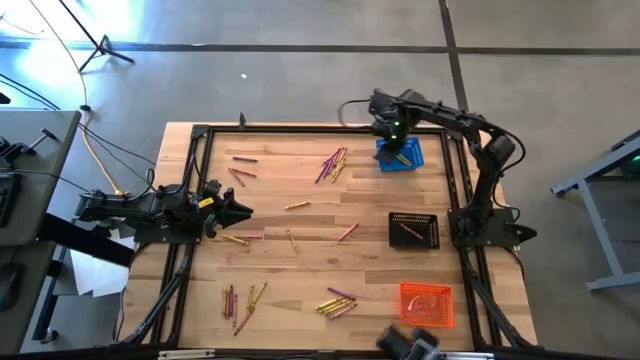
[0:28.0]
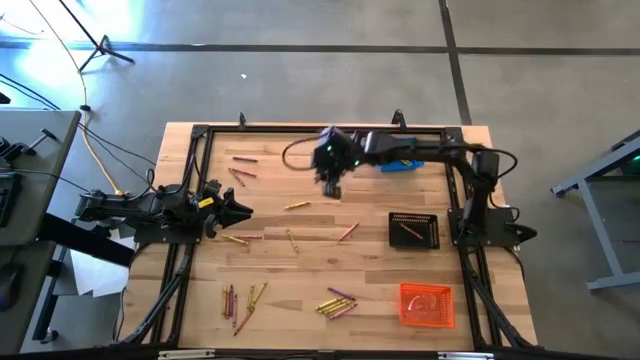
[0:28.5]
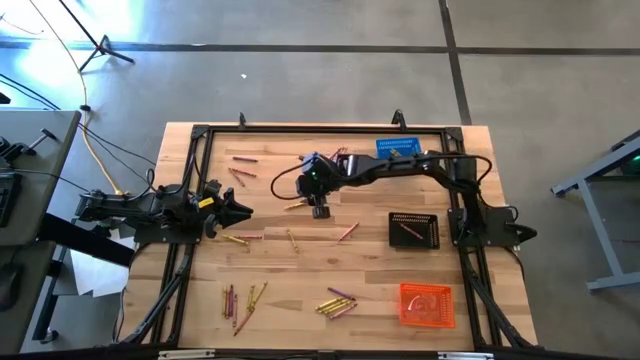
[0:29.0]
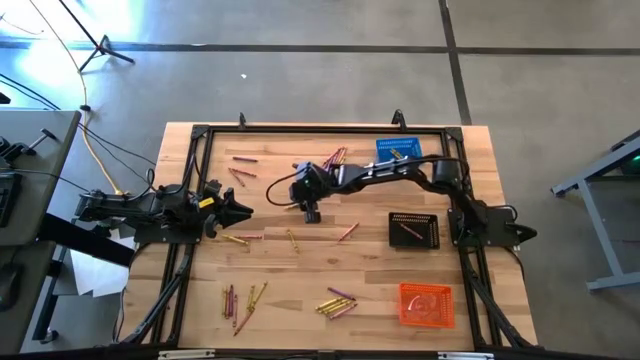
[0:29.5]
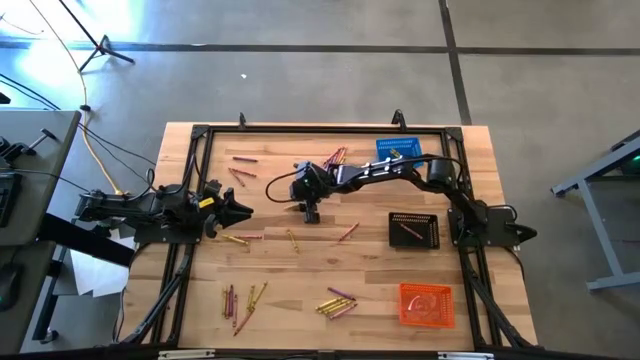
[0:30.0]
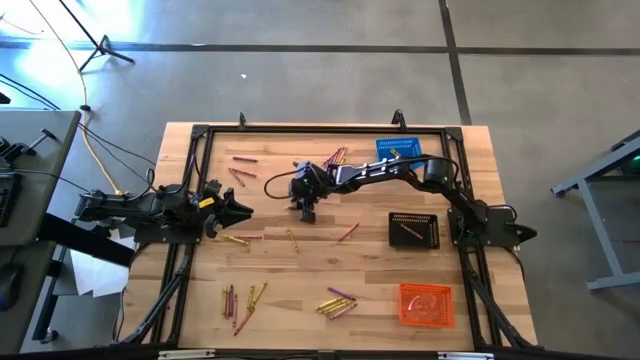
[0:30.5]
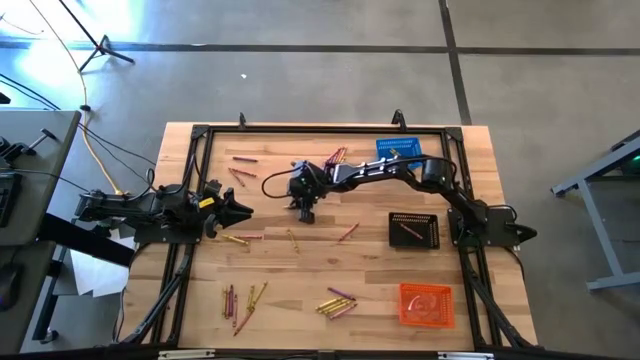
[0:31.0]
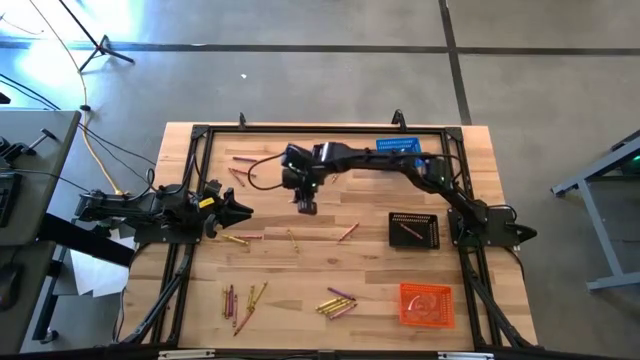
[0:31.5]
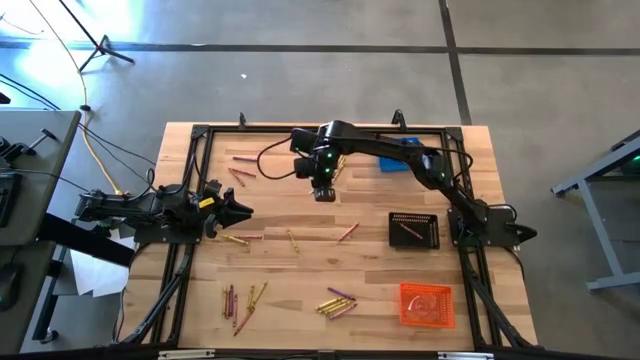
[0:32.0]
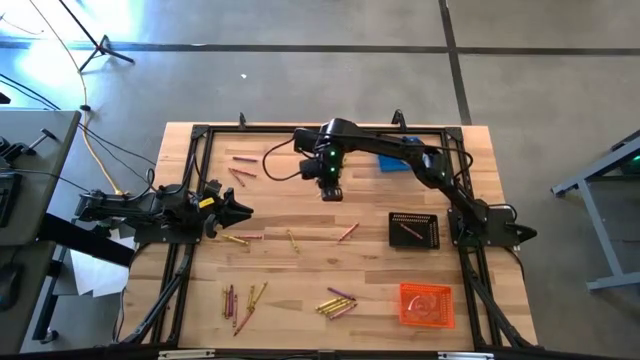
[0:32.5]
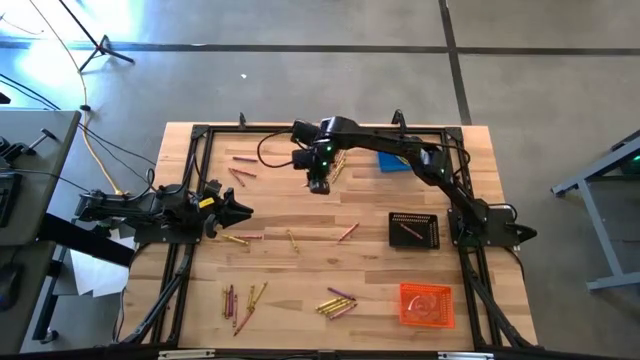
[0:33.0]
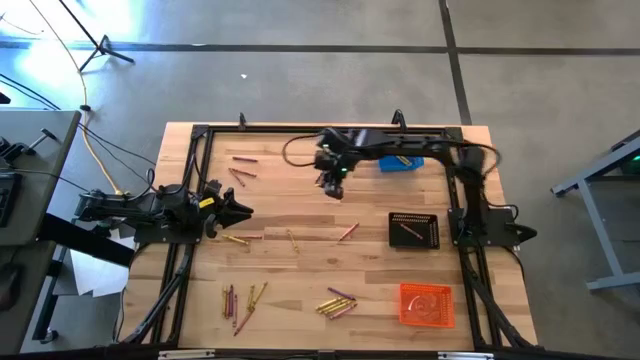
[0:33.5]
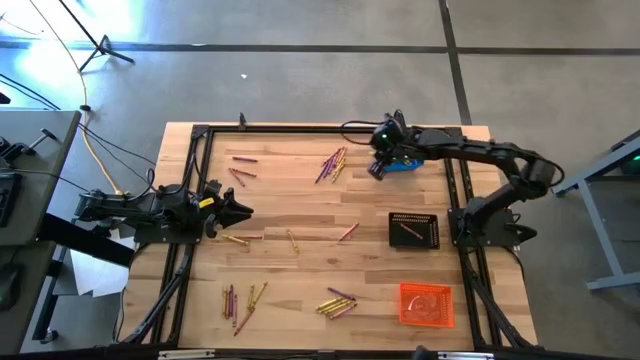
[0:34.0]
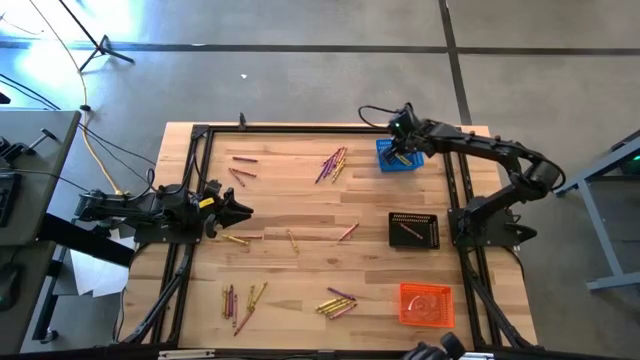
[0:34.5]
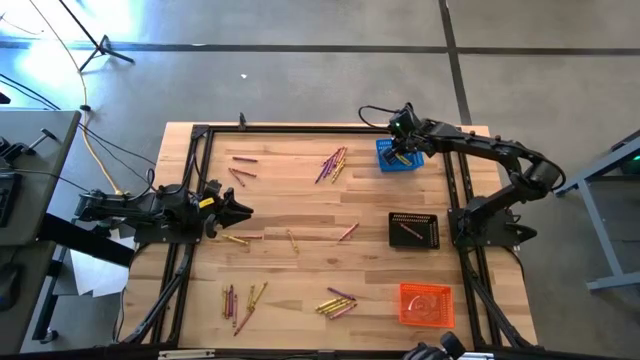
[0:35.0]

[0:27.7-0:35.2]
Task: Sort crayons
Put the yellow crayon into the blue bin

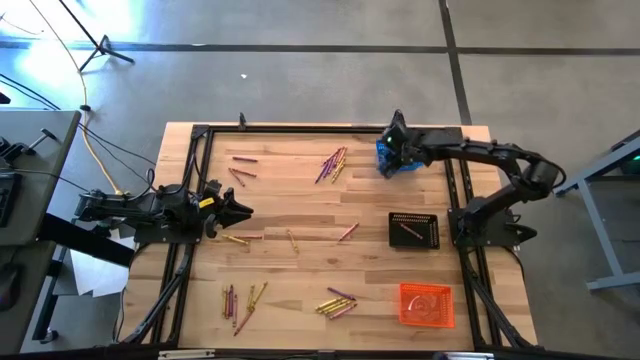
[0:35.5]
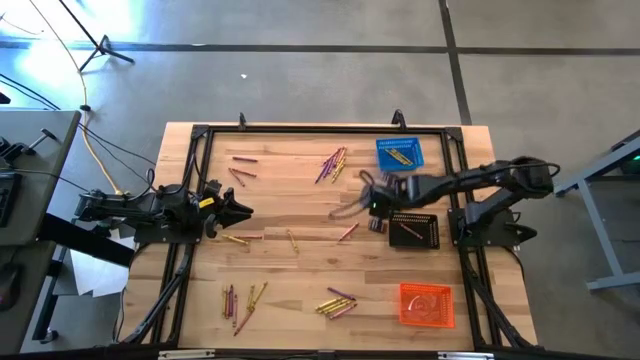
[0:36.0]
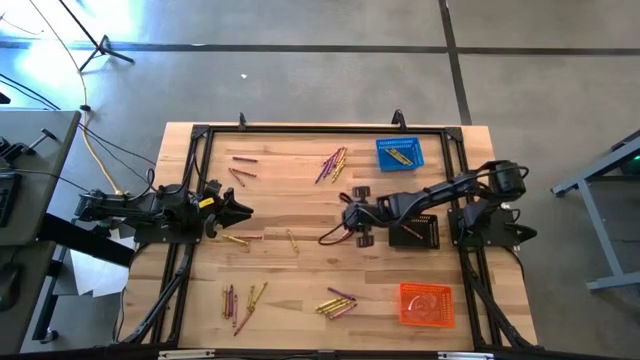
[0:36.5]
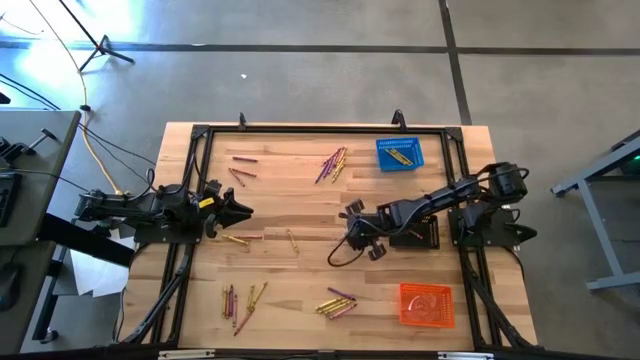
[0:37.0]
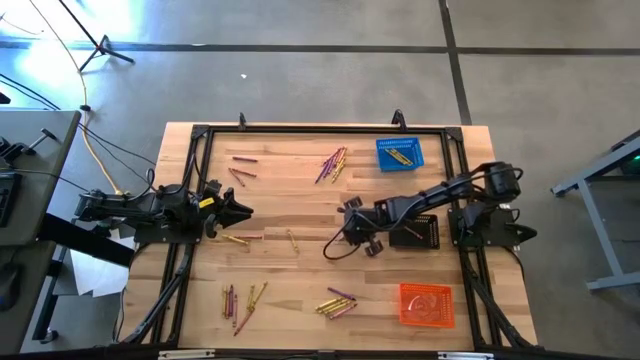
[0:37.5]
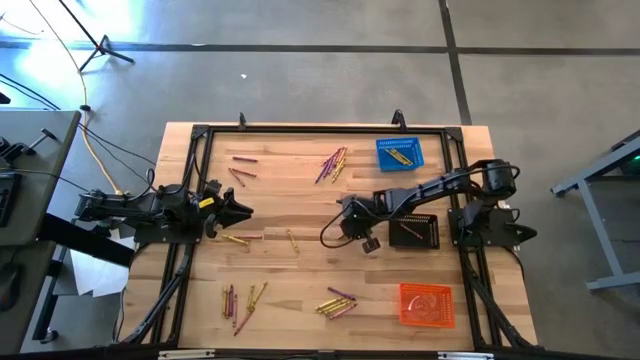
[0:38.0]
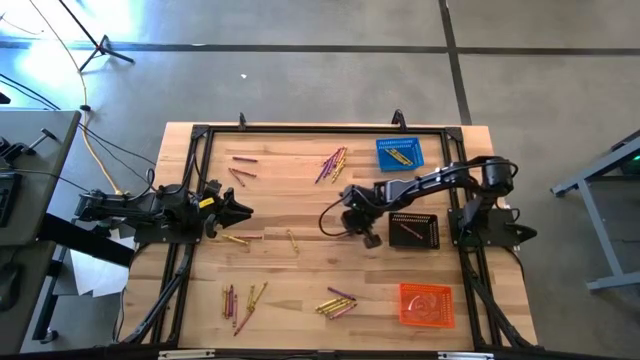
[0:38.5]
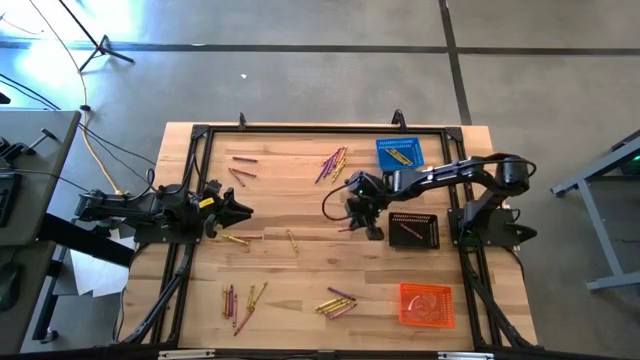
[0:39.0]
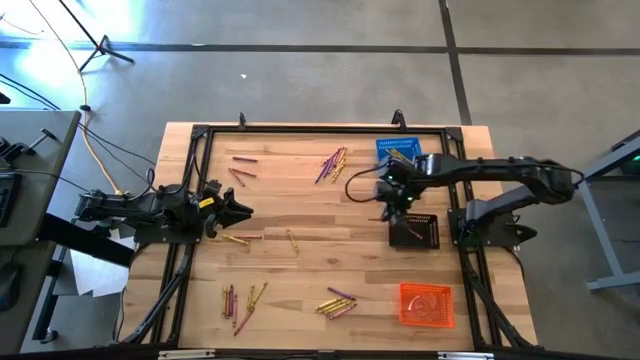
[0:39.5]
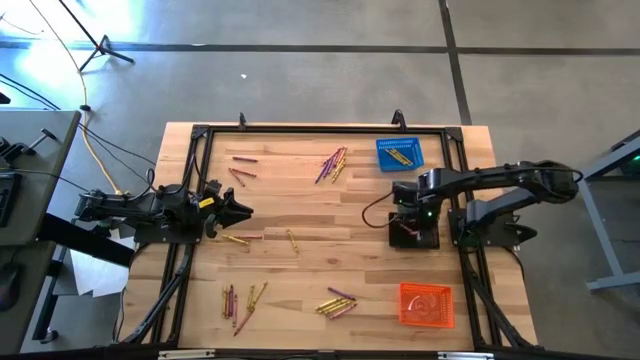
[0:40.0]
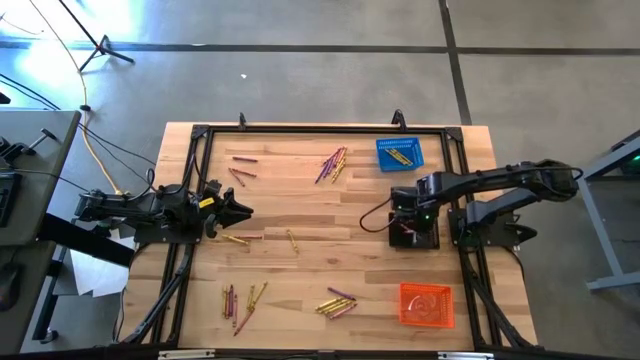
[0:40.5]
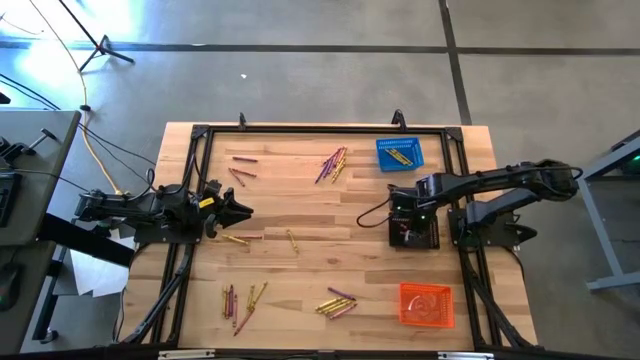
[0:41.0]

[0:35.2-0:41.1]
Put the red crayon into the black bin

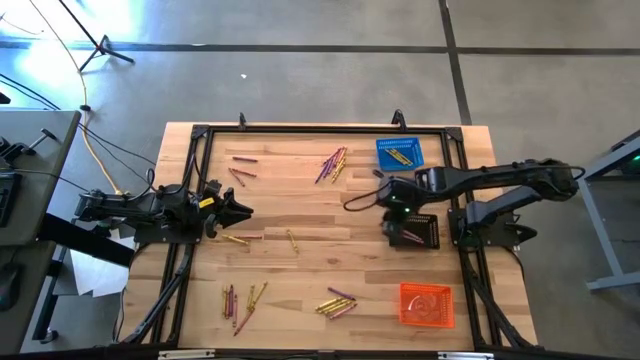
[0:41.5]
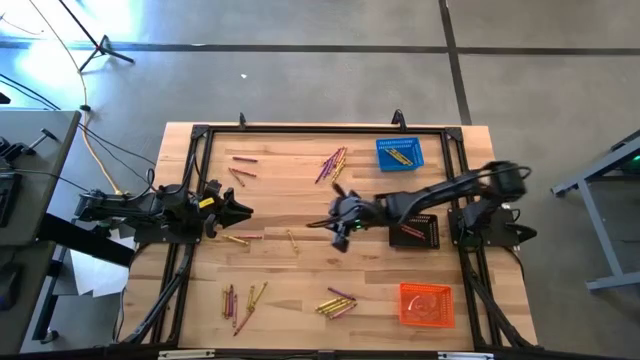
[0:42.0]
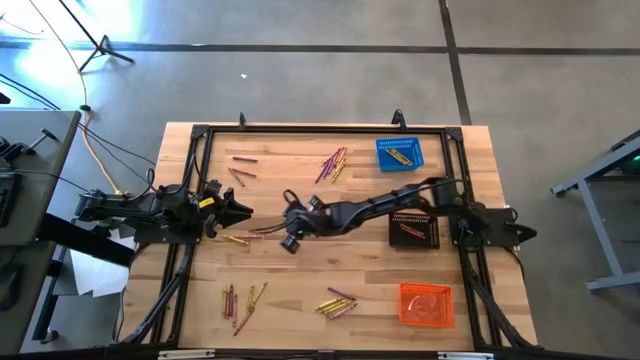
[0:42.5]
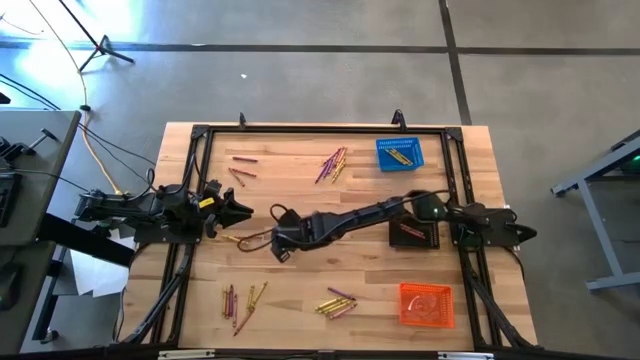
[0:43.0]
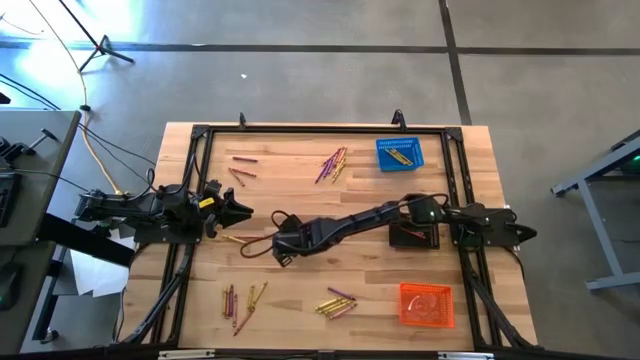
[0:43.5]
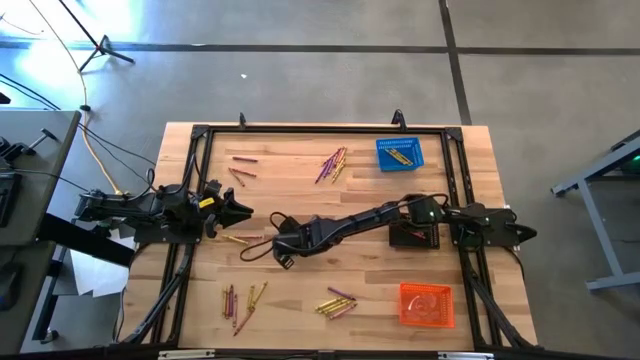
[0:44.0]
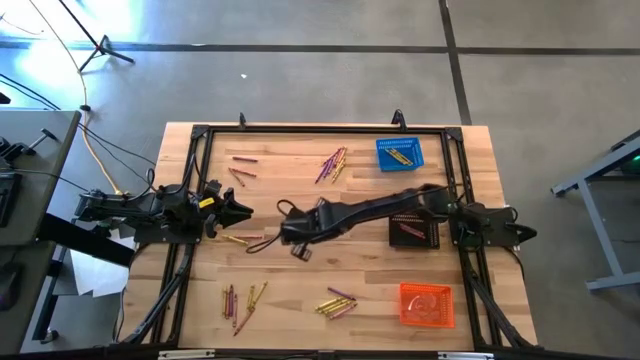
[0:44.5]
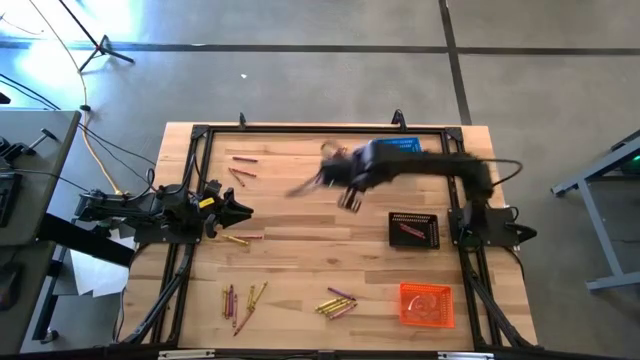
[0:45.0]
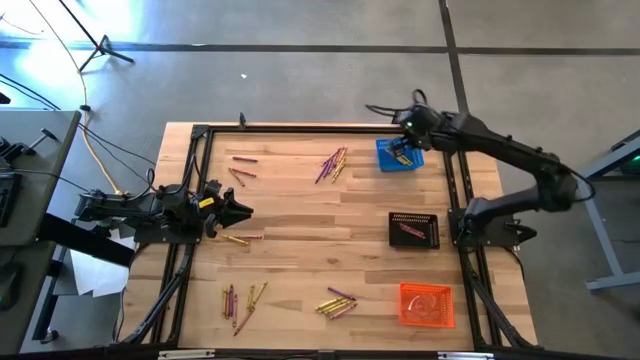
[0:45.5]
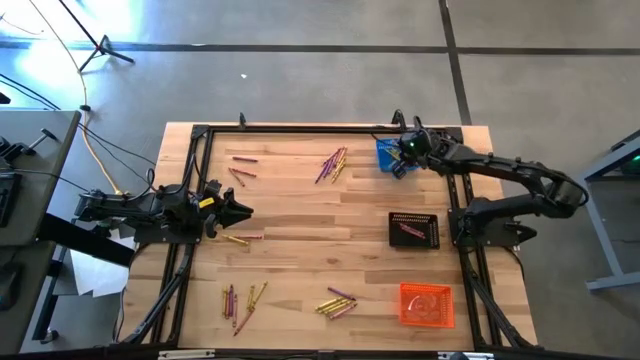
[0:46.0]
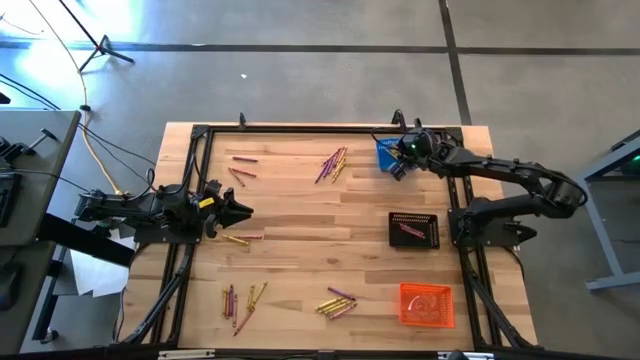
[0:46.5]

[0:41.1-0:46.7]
Put the yellow crayon into the blue bin

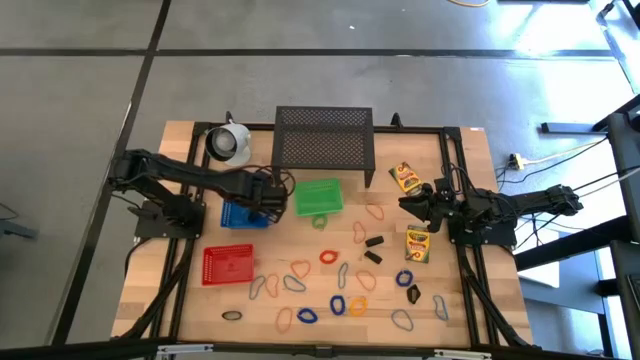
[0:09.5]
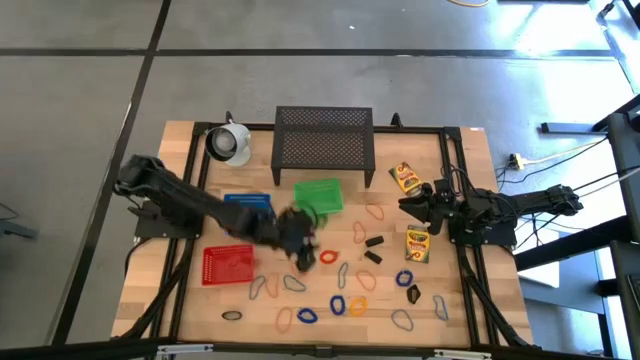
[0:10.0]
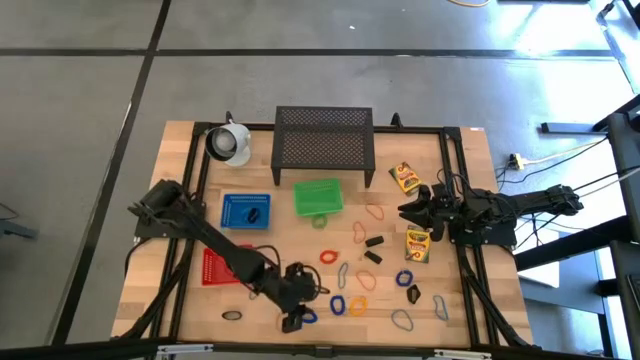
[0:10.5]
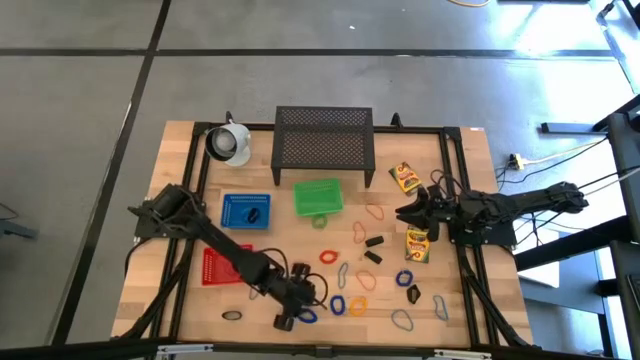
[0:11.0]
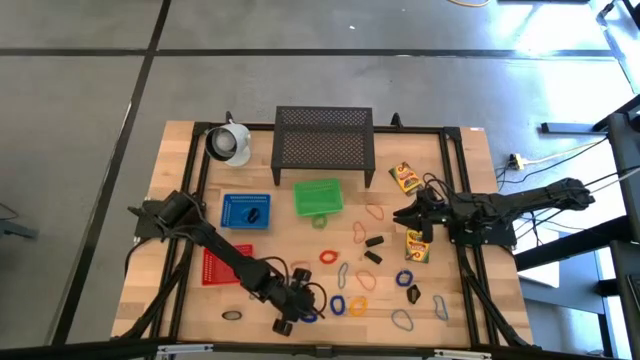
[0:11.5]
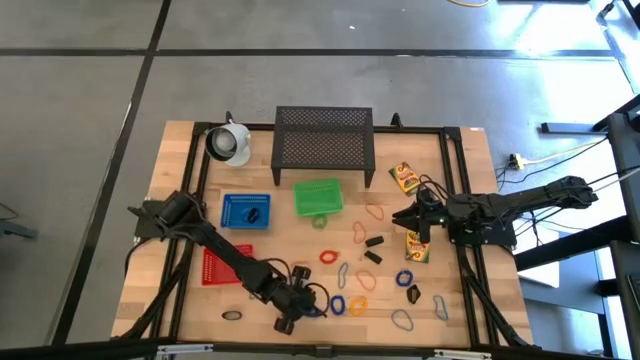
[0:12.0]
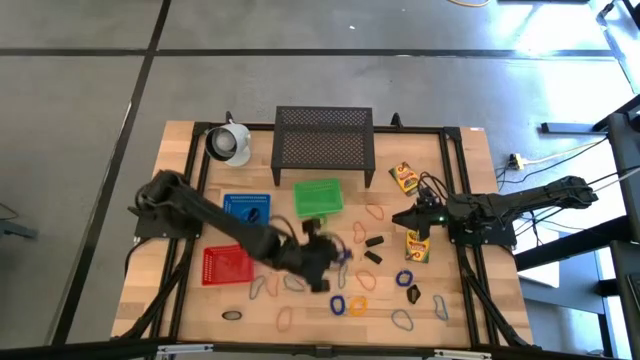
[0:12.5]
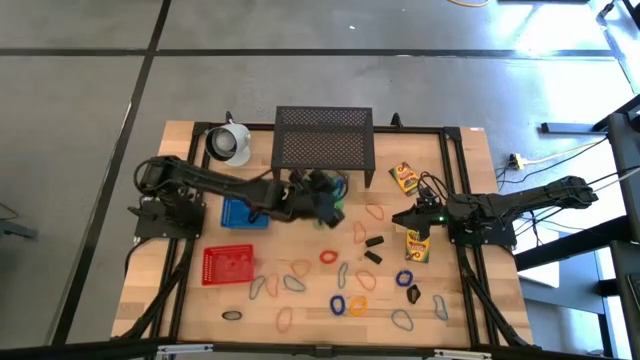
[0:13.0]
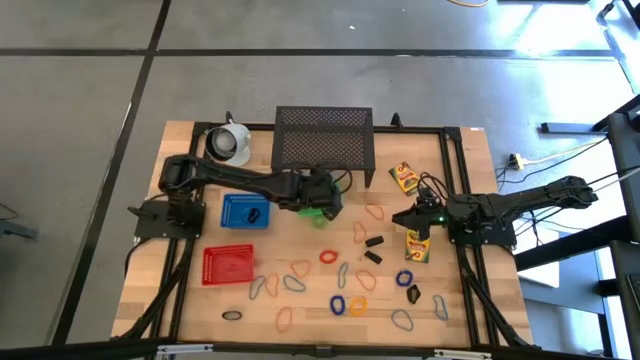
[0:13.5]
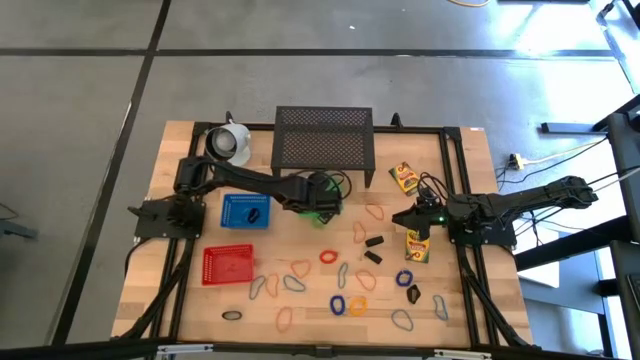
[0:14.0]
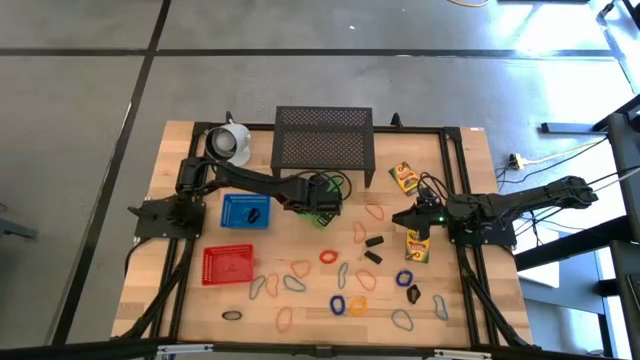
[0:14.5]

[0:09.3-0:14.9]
Task: Pick & Place Office Desk Supplies
Put the left blue spring keychain into the green bin
